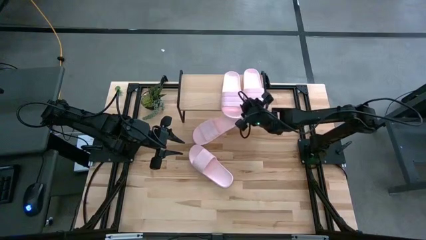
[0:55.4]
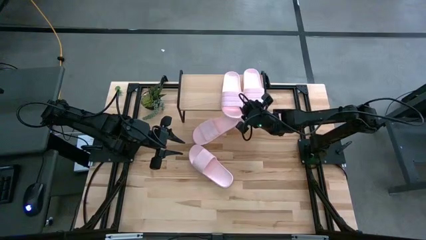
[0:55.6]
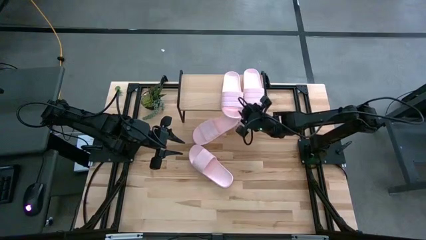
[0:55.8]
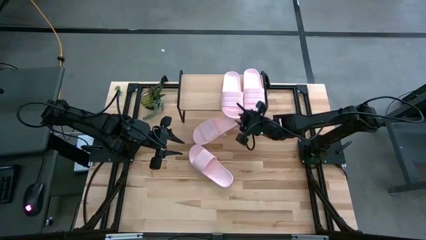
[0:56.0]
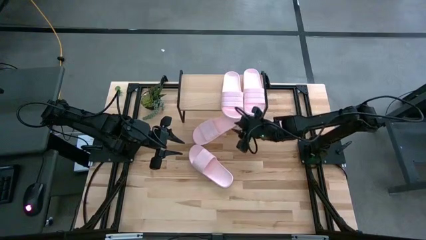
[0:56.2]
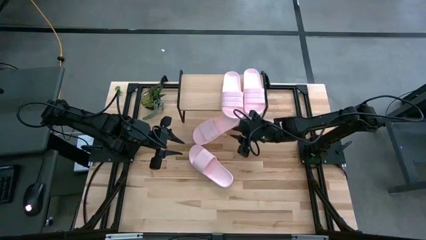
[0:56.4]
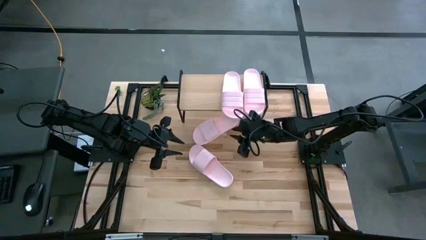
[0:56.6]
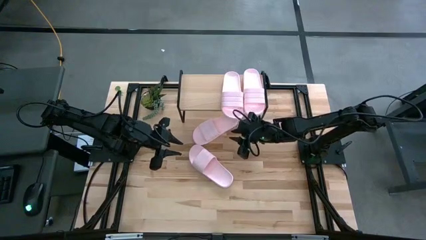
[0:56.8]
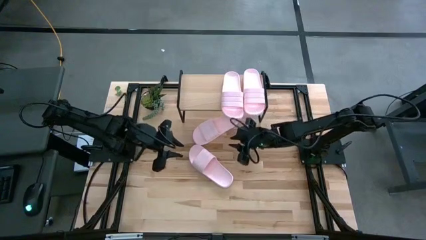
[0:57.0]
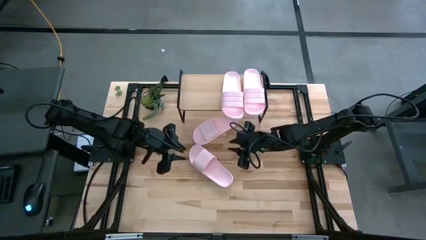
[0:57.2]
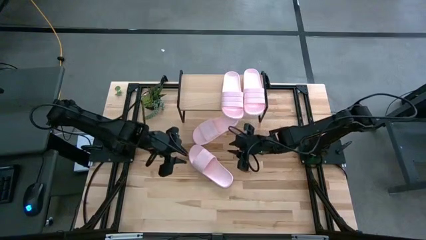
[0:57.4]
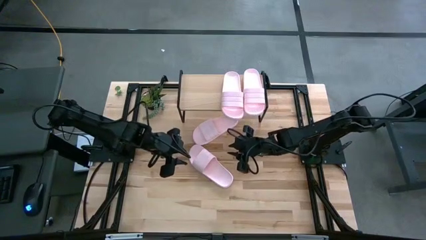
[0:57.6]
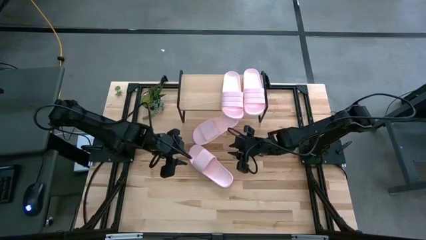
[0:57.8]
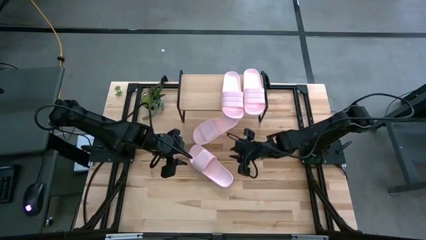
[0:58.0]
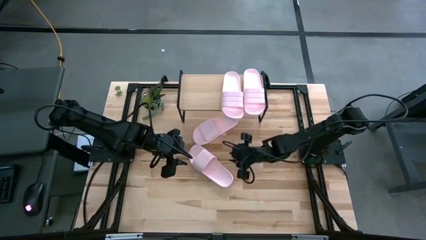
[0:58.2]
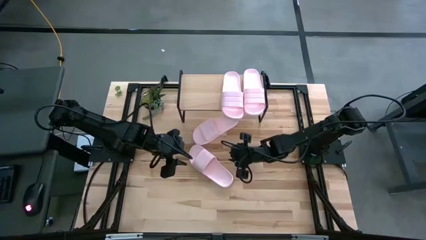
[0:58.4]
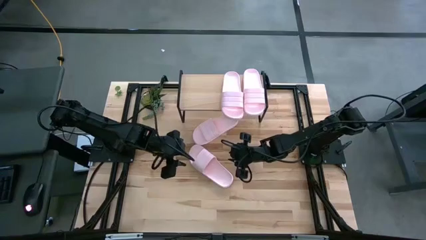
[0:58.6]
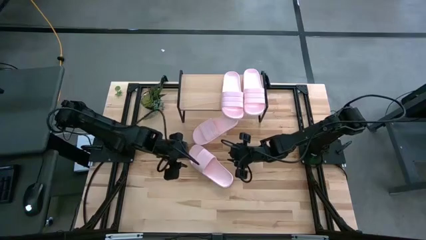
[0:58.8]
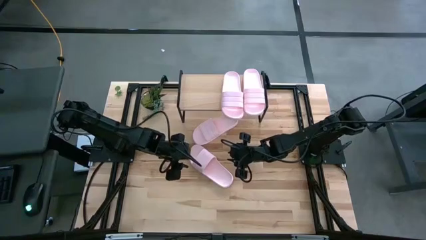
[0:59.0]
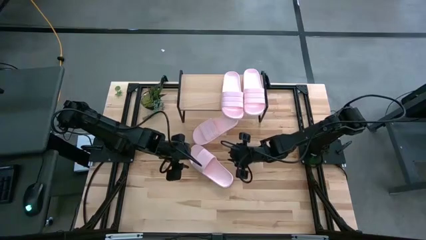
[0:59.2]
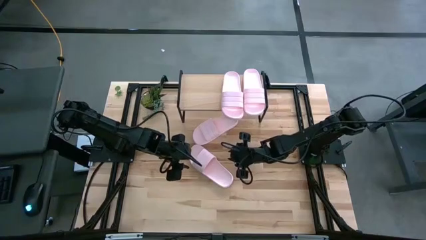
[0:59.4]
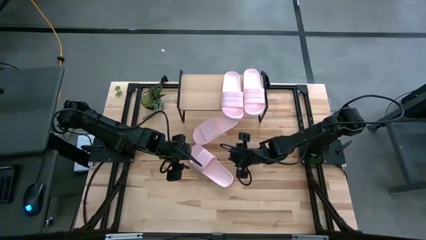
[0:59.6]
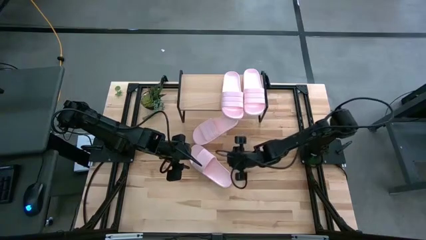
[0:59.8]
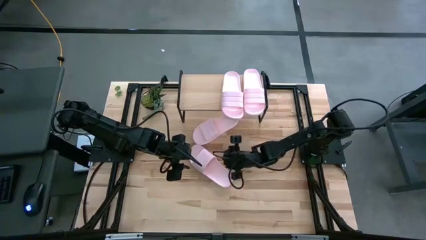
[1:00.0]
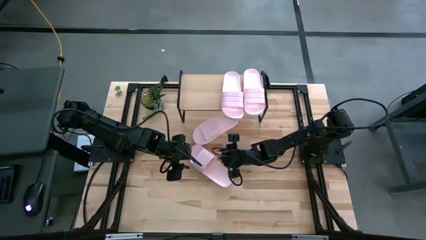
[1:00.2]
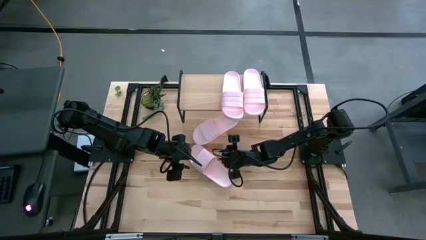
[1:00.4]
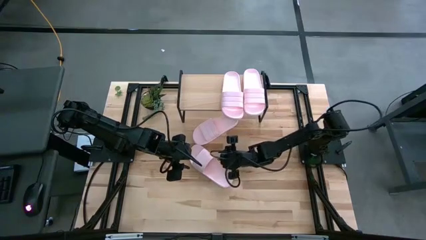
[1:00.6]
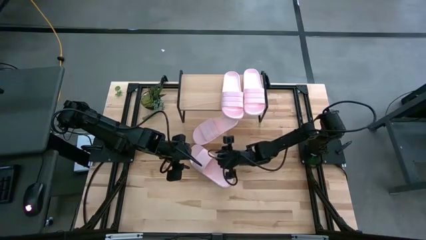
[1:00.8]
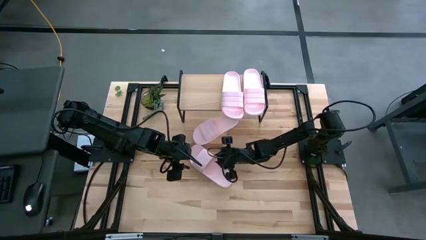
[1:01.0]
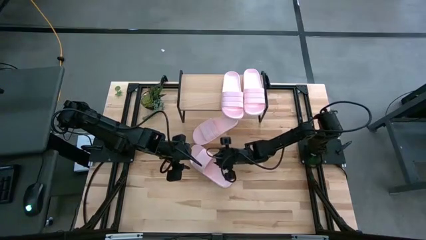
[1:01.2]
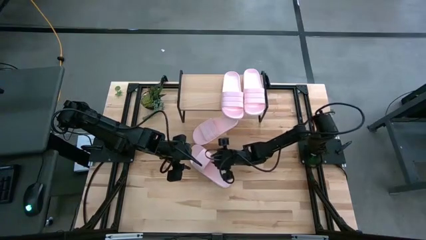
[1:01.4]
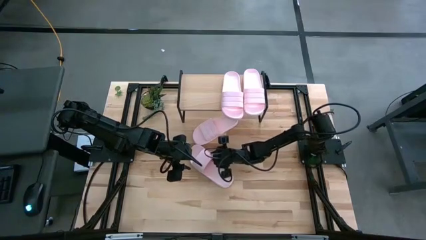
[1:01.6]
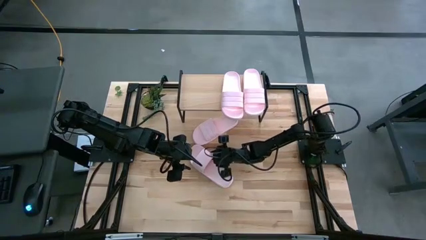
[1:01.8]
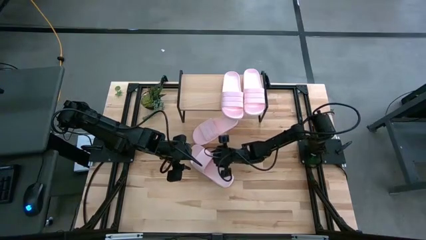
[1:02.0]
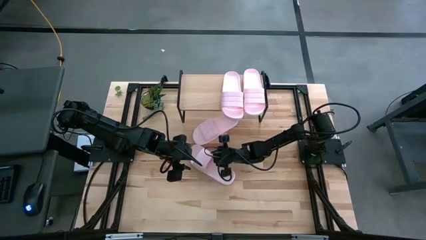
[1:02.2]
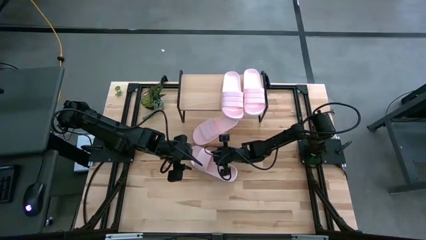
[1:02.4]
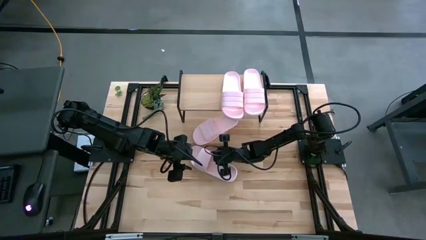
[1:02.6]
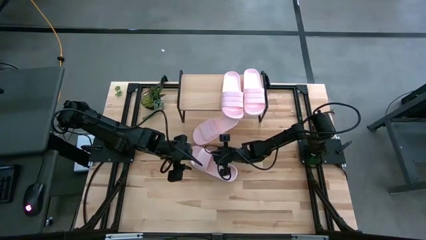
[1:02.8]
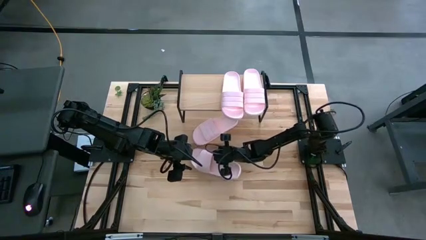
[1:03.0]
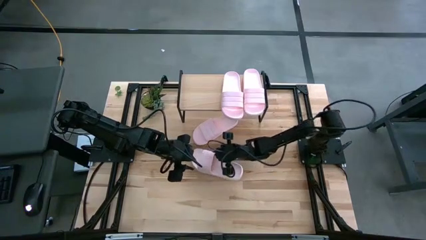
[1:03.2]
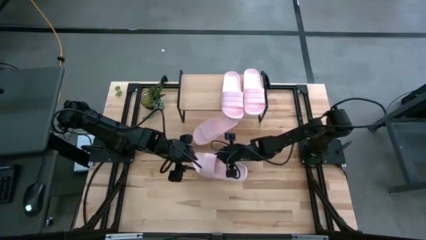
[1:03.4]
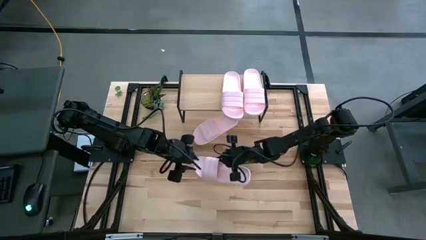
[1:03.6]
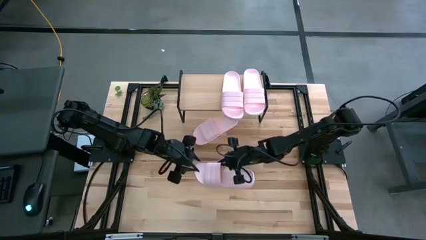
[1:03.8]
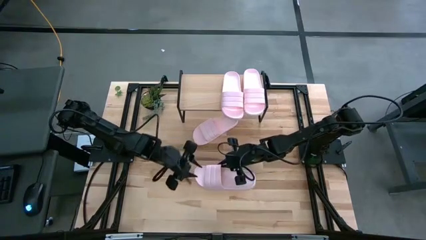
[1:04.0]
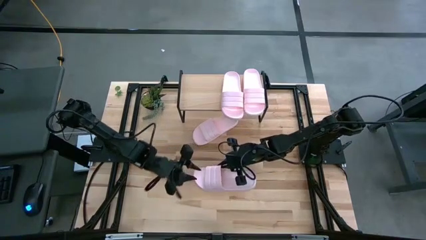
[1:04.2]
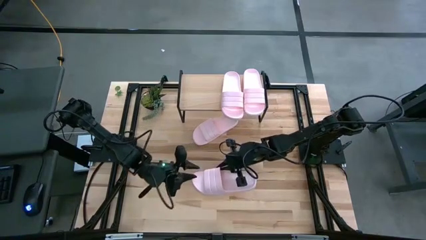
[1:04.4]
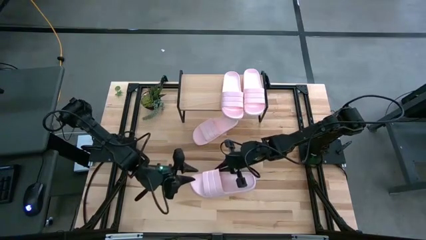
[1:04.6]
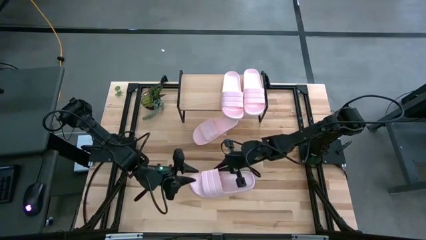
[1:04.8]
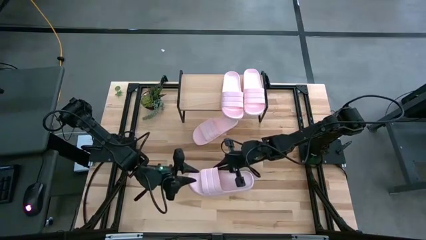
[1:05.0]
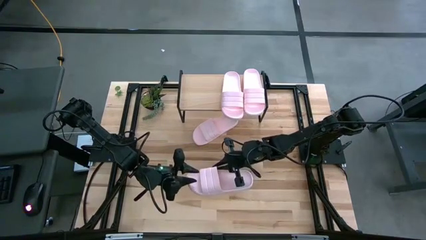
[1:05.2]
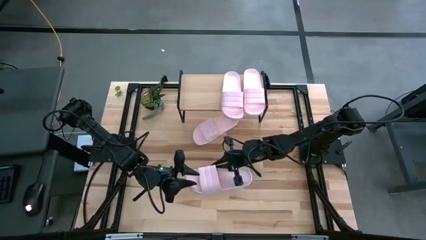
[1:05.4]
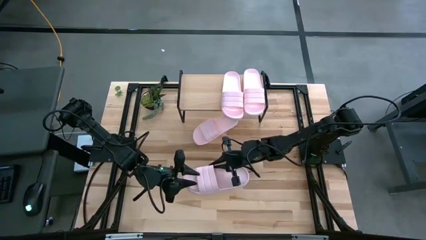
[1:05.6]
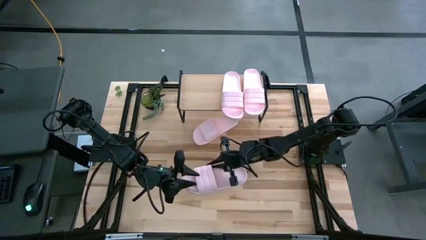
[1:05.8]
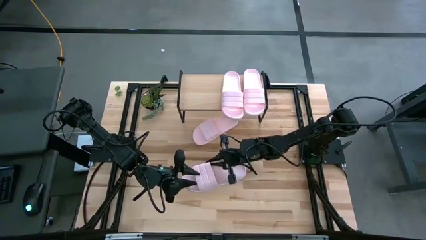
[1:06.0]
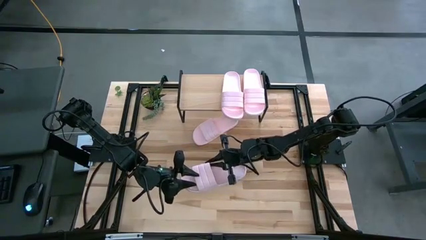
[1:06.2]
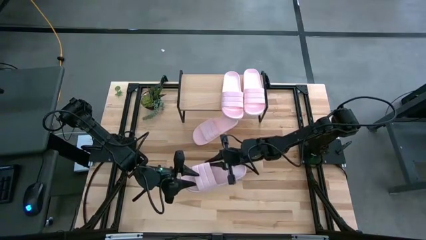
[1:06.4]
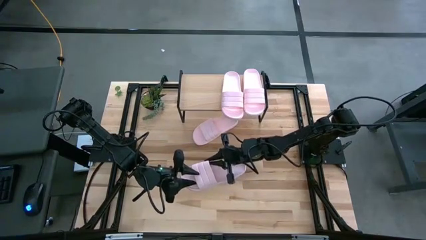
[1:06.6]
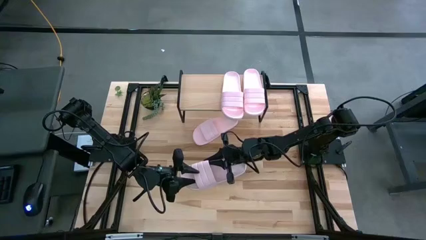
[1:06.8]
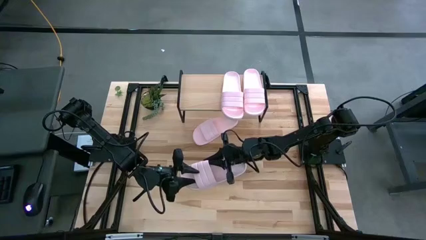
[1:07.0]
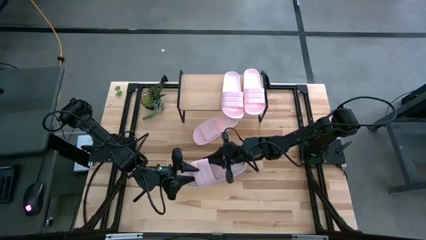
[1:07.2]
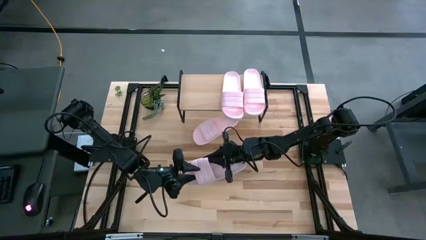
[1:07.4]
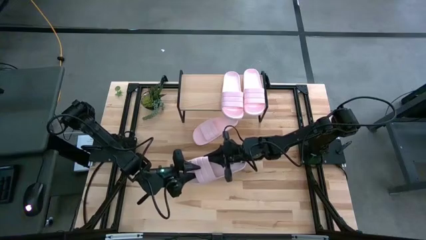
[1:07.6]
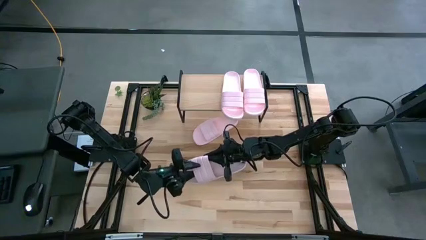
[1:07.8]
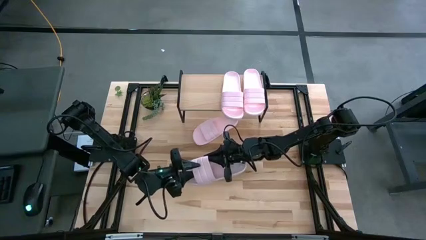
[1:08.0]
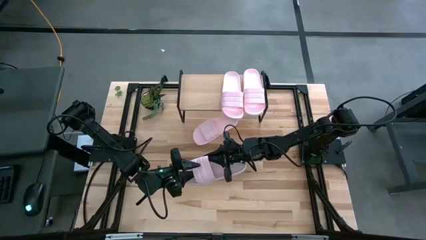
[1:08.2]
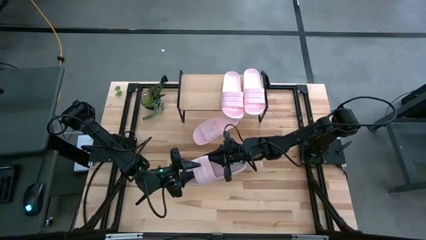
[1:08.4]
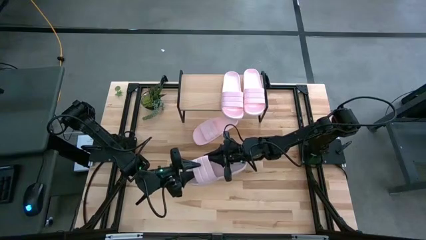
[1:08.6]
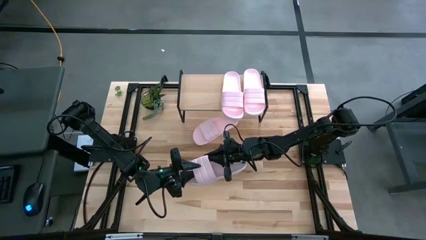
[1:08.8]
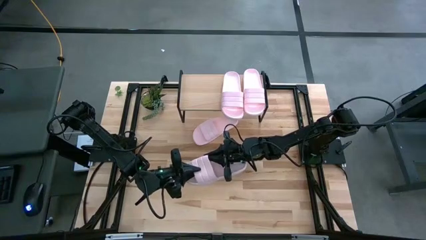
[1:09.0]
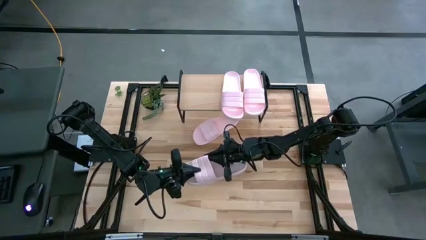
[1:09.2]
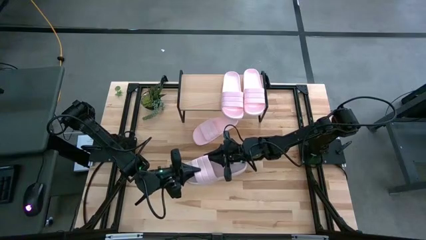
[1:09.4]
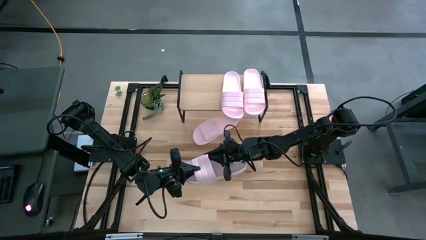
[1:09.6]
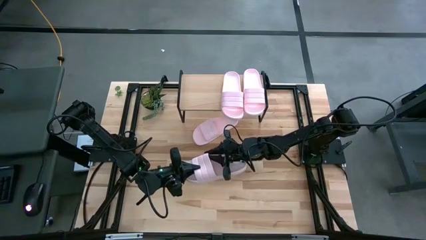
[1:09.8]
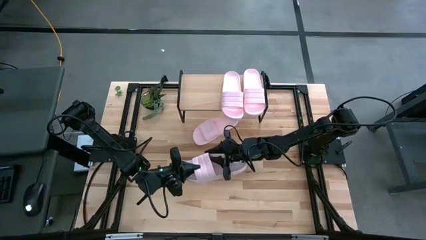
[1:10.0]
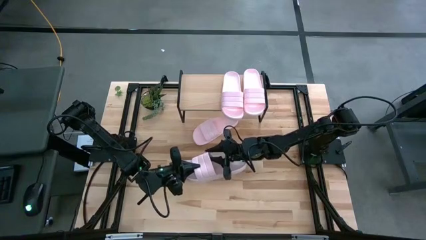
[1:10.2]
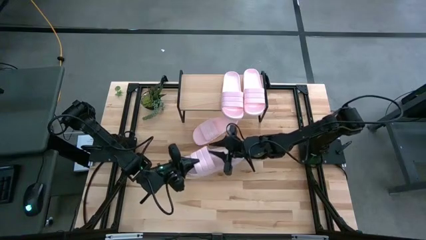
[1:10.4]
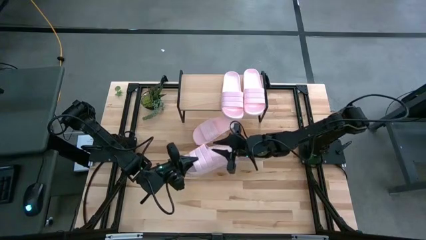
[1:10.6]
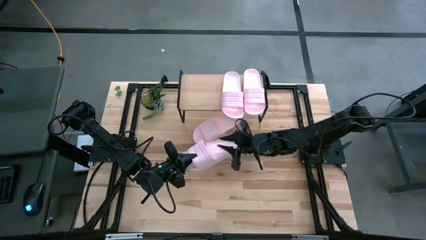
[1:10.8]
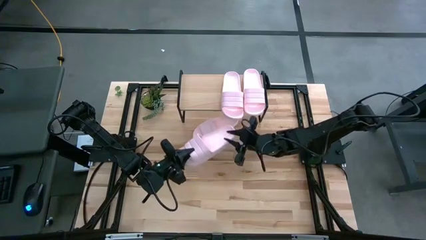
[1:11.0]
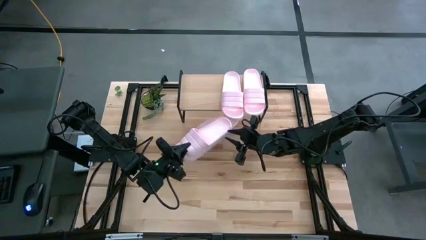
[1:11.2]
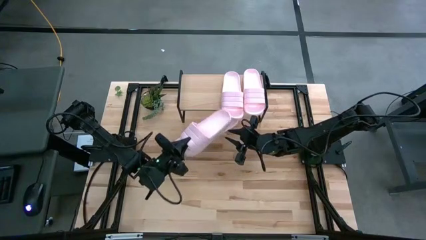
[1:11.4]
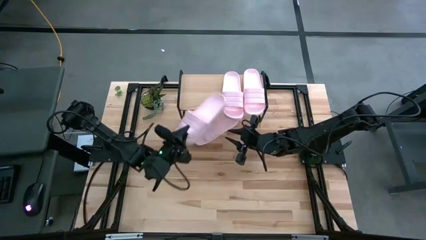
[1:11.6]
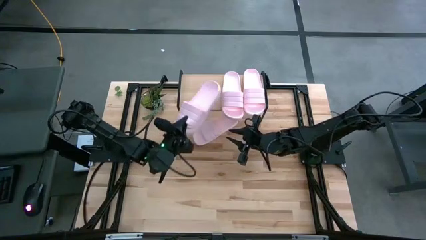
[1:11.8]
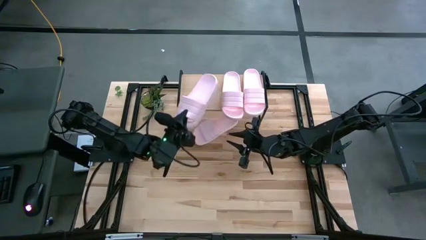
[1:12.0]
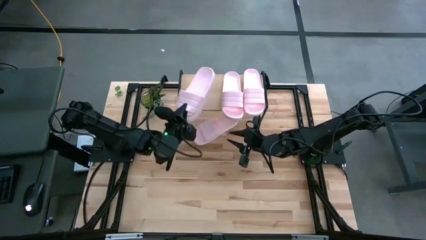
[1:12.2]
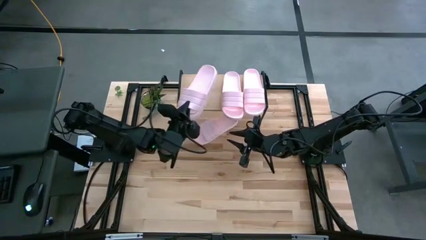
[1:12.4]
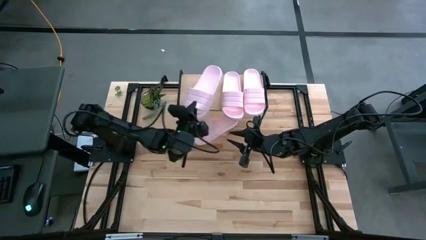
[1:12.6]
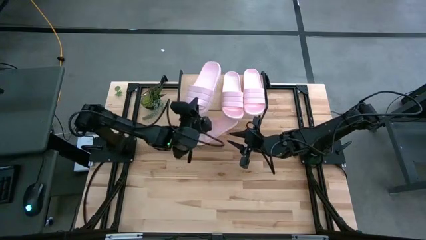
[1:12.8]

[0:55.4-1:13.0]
Task: Pick and place slides into the shelf
Put the pink slide on the shelf
